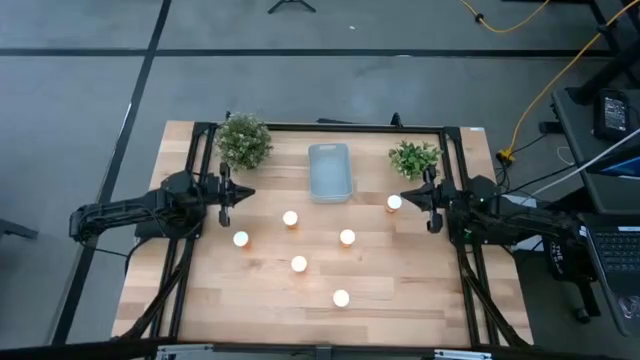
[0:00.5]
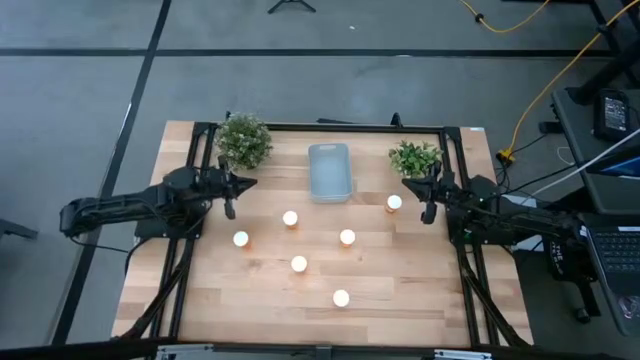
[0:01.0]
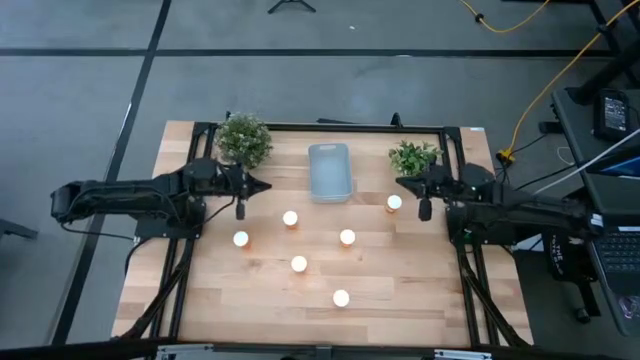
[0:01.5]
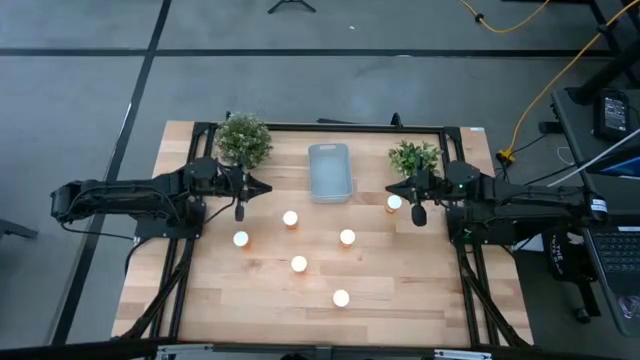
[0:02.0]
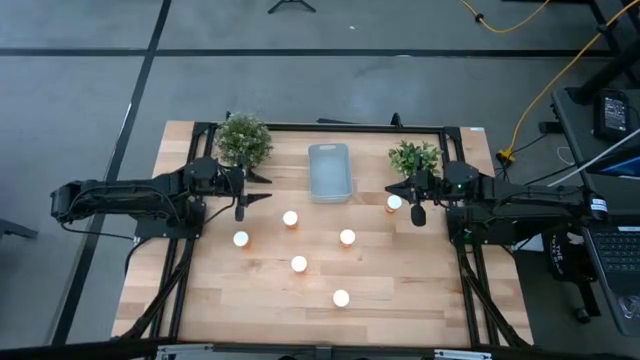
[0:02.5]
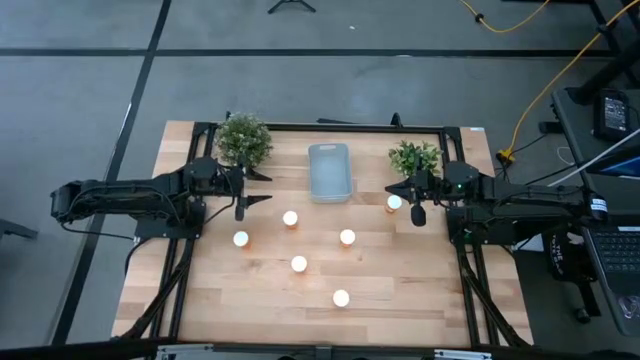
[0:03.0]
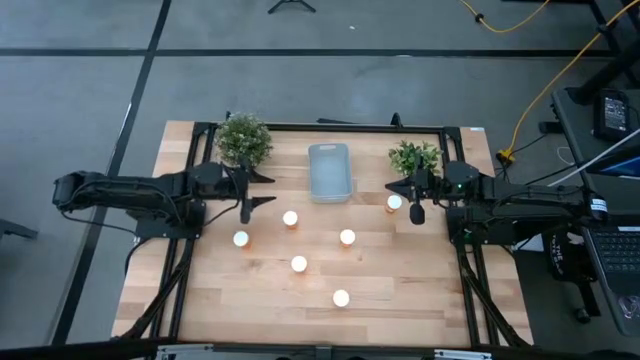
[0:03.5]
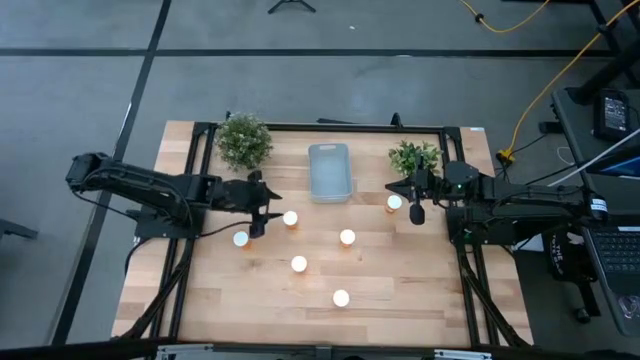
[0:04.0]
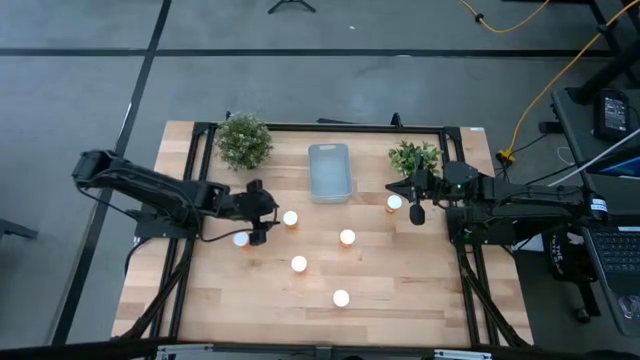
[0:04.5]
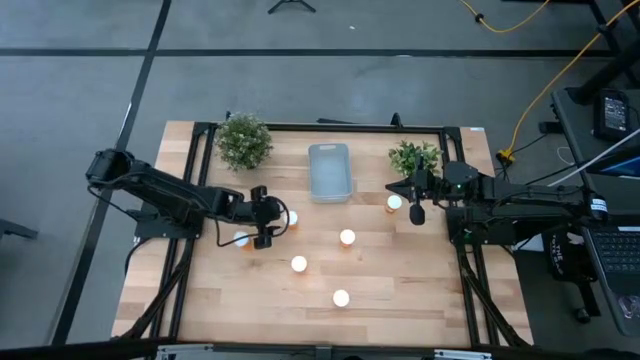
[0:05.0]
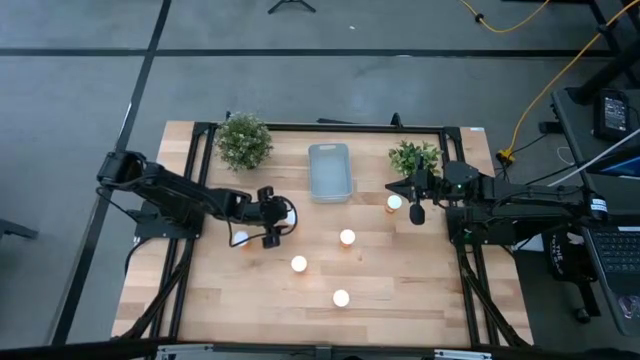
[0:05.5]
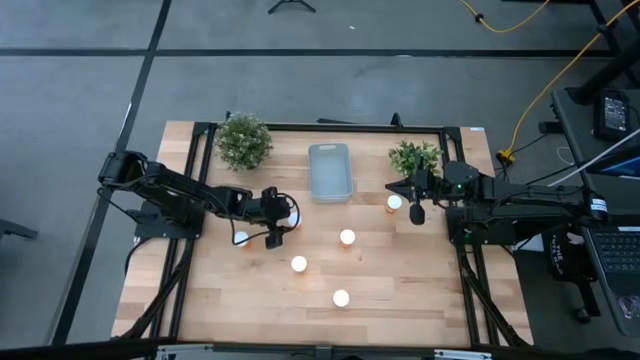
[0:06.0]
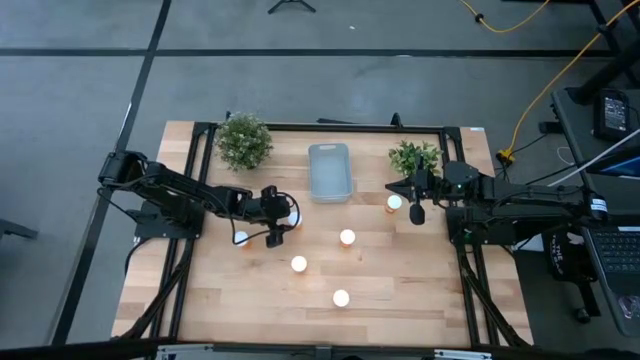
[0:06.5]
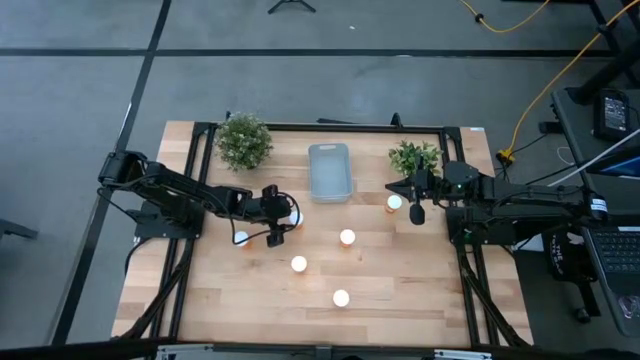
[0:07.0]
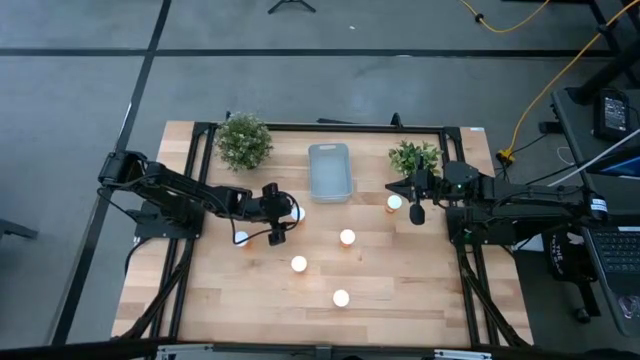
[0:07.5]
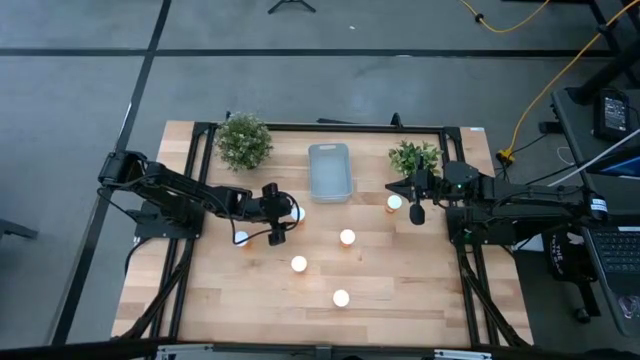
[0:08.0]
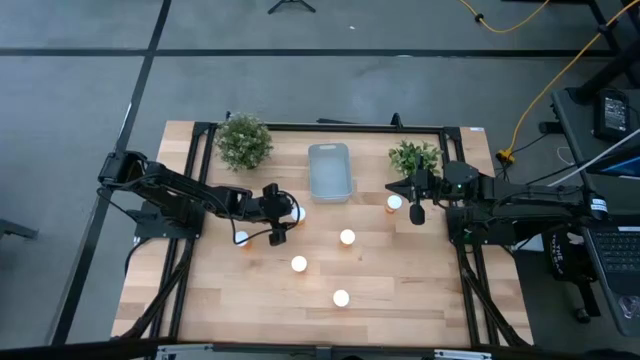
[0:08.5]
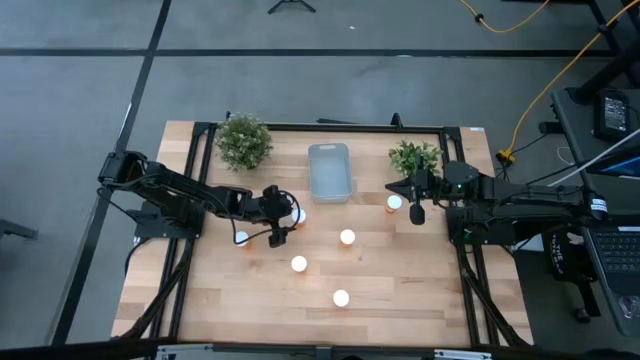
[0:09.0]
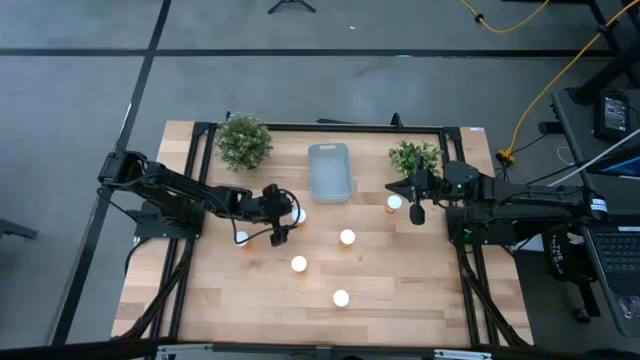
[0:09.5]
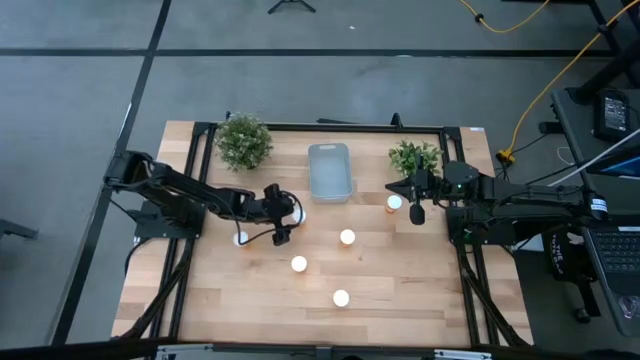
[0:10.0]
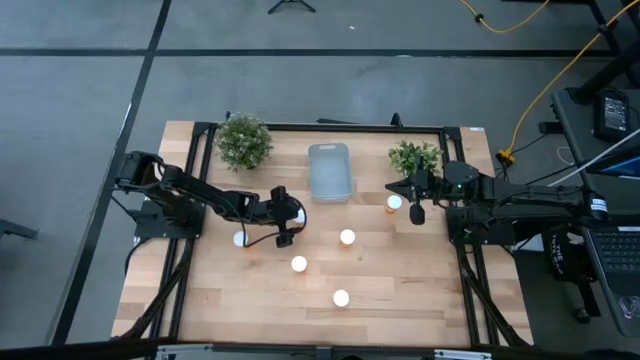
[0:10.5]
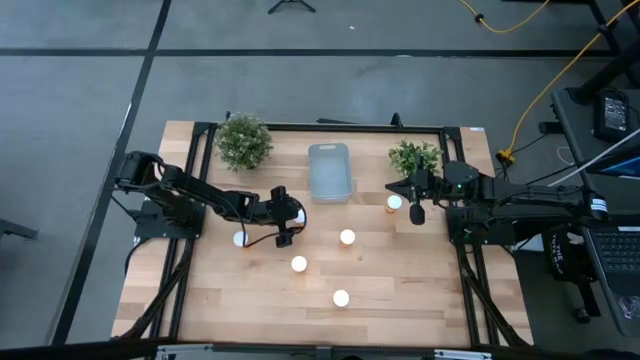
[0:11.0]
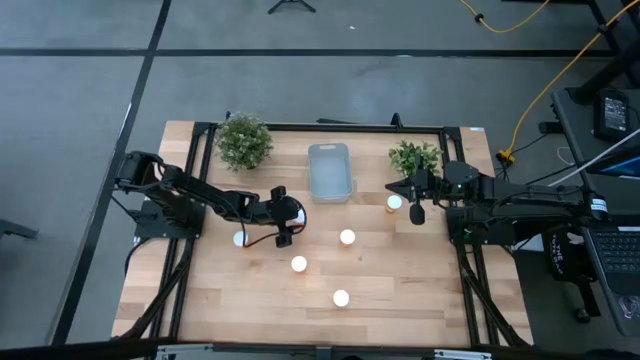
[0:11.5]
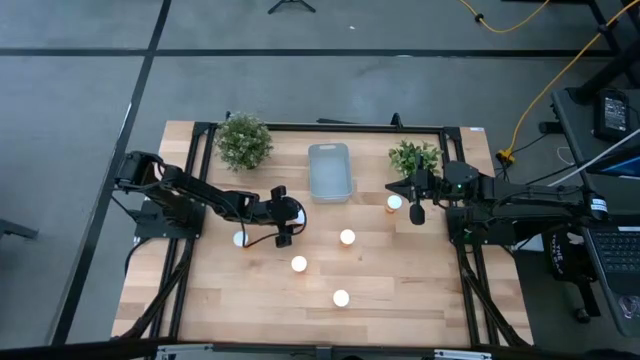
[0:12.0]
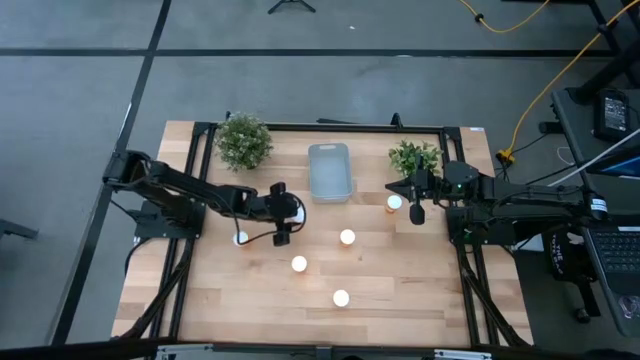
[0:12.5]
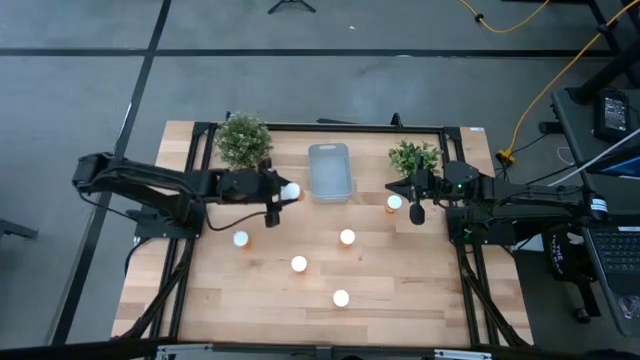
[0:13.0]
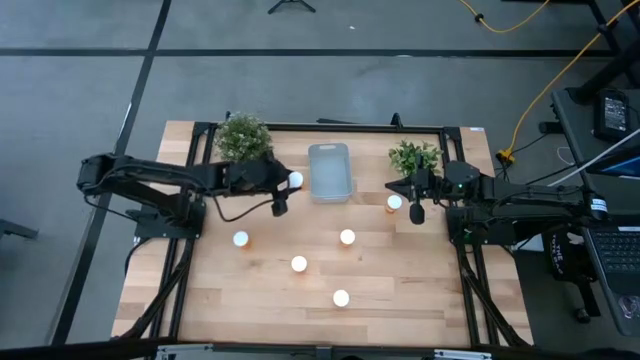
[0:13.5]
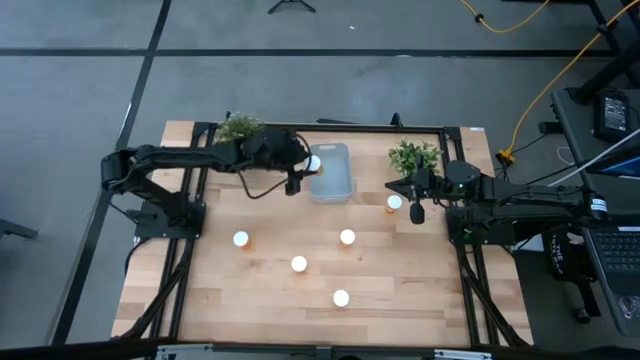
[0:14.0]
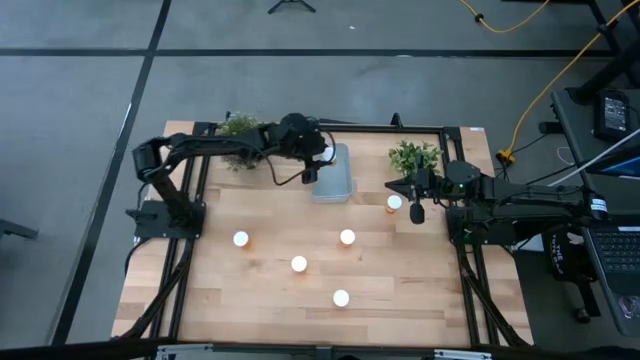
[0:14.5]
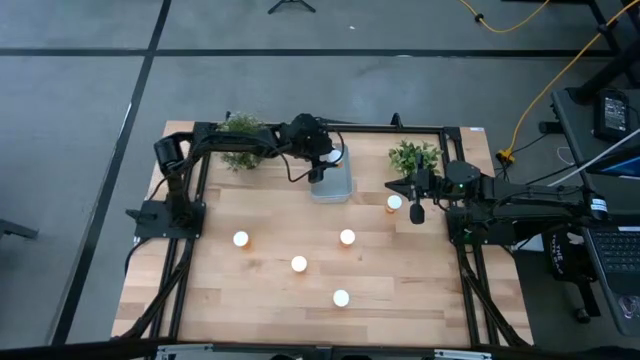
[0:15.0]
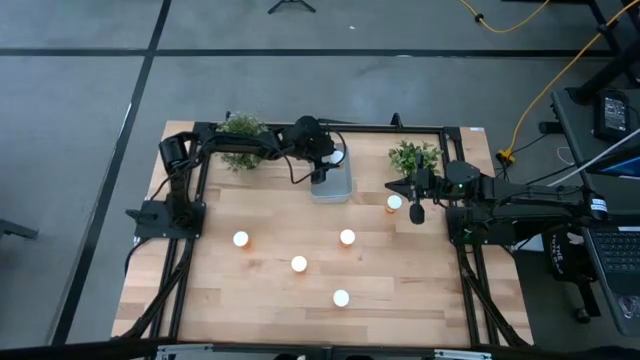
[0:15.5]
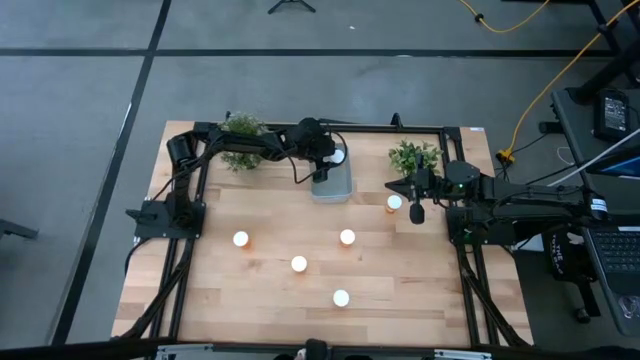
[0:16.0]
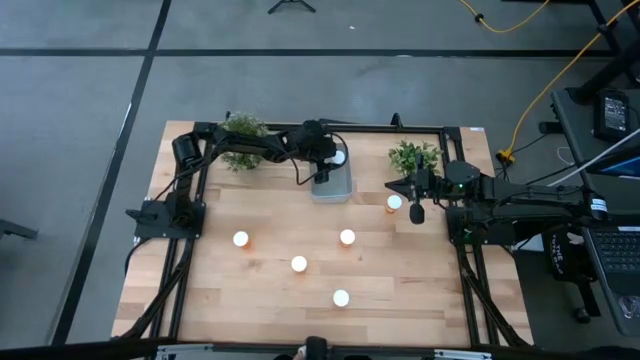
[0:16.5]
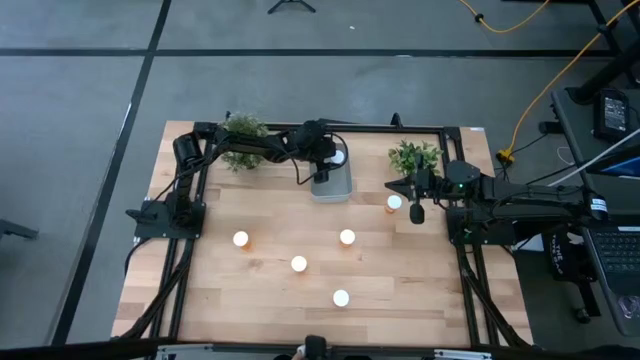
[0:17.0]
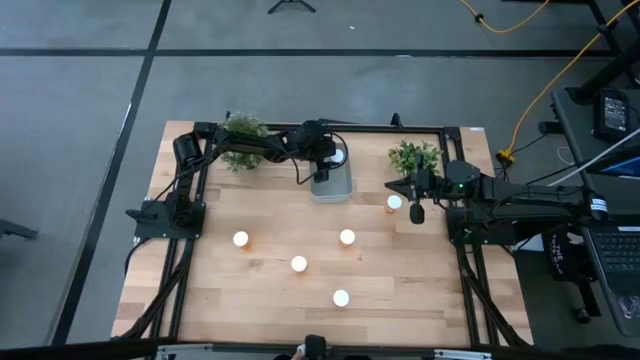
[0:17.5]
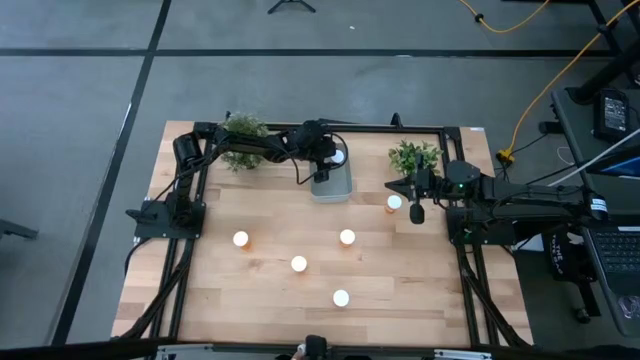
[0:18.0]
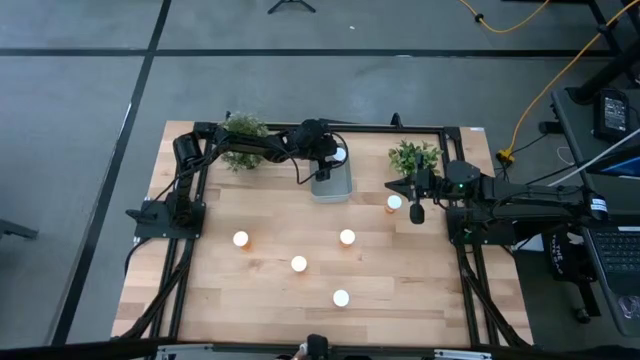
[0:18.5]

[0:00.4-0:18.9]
Task: Pick and place pill bottles into a basket
Put the orange pill bottle into the gray bin
